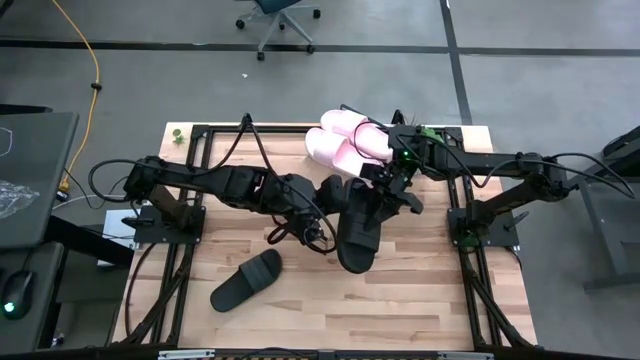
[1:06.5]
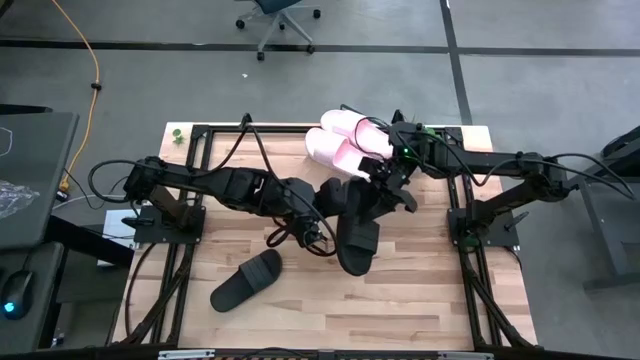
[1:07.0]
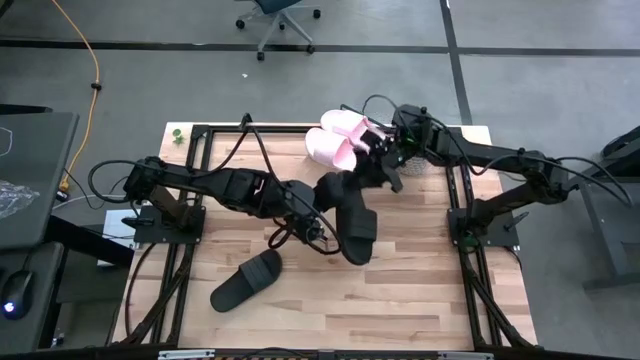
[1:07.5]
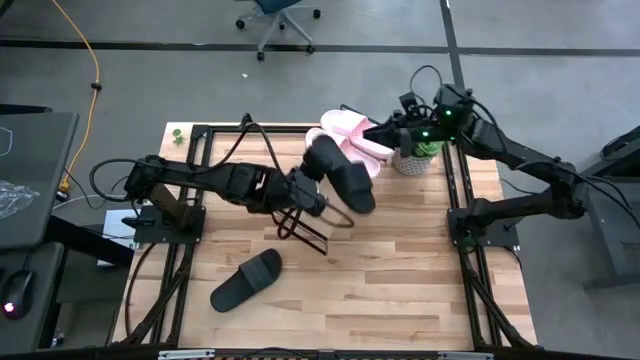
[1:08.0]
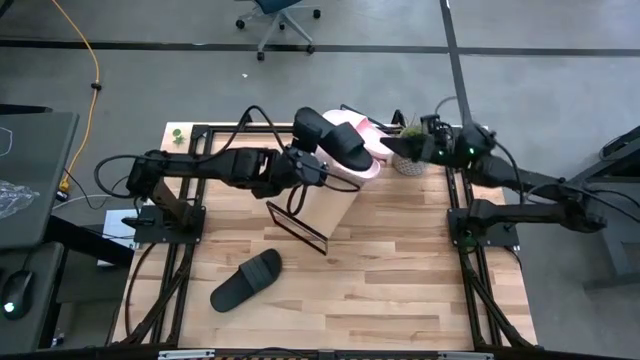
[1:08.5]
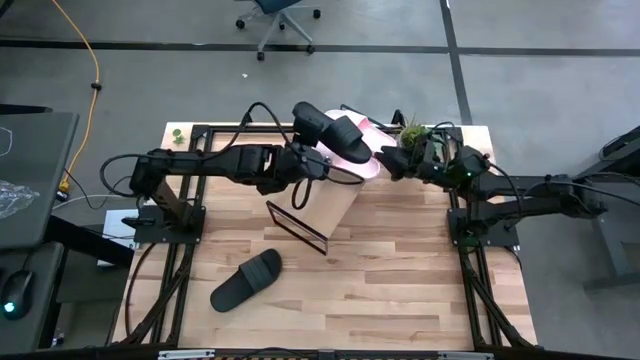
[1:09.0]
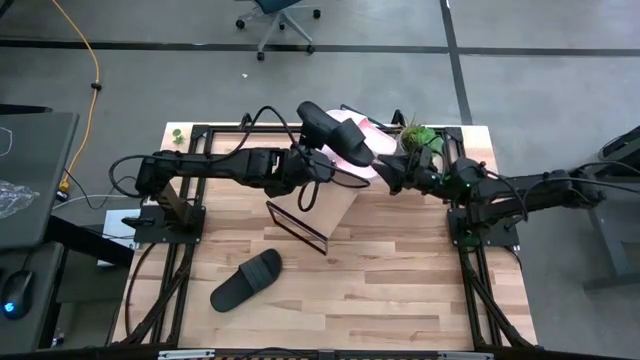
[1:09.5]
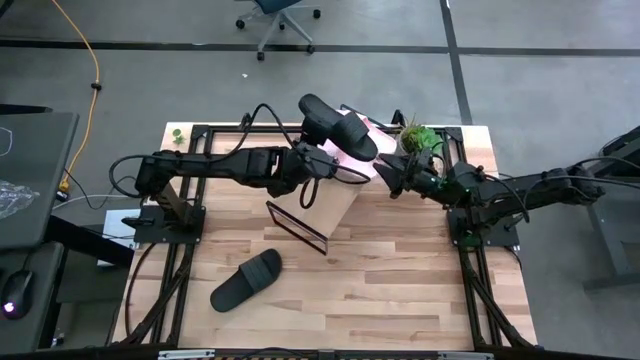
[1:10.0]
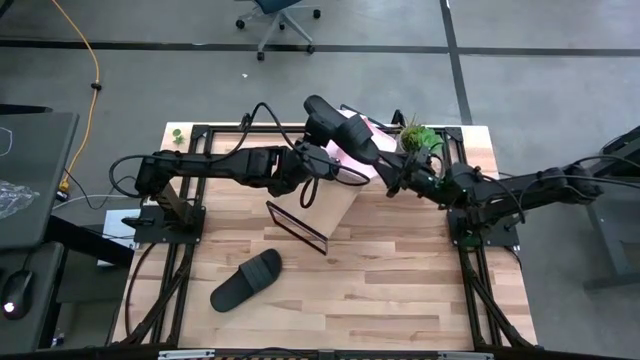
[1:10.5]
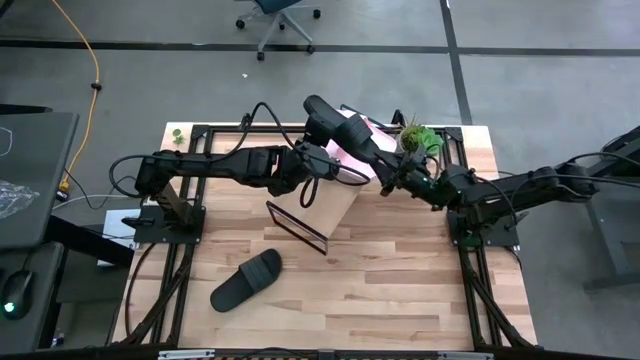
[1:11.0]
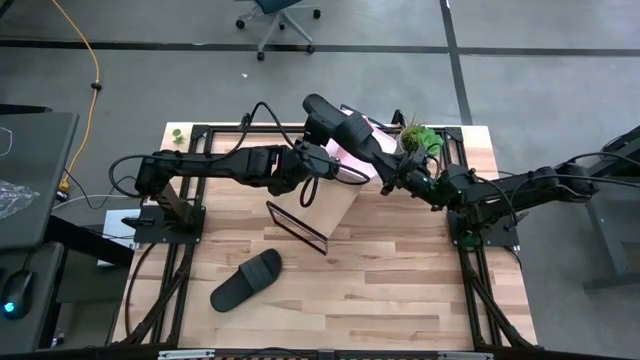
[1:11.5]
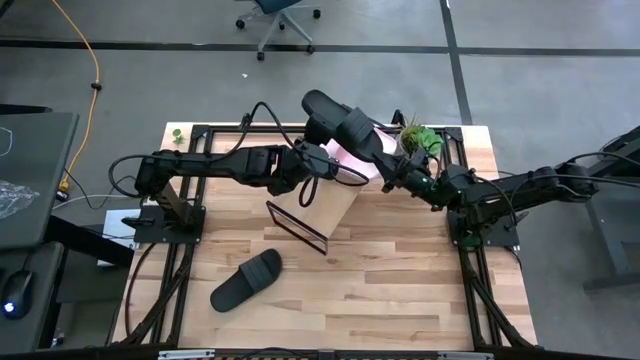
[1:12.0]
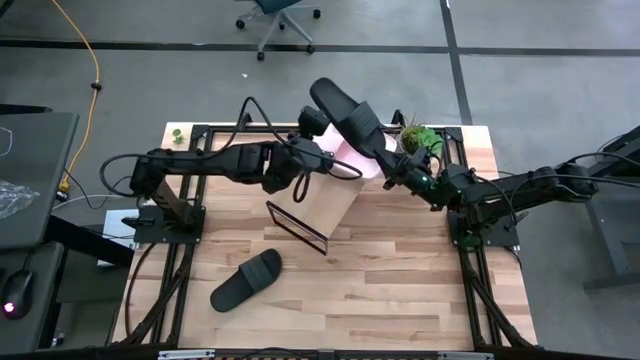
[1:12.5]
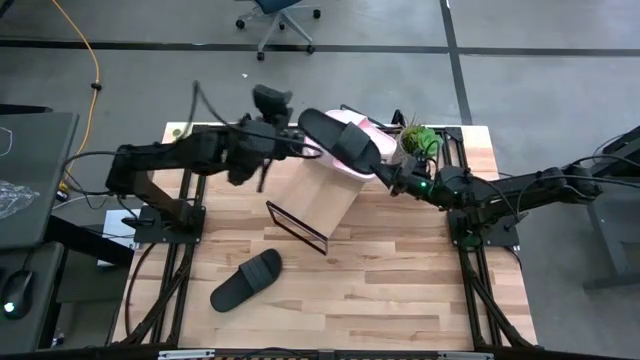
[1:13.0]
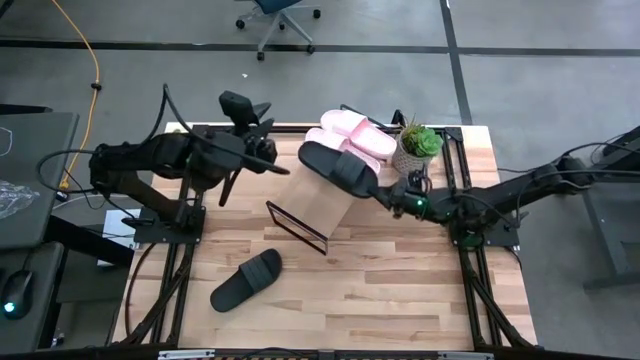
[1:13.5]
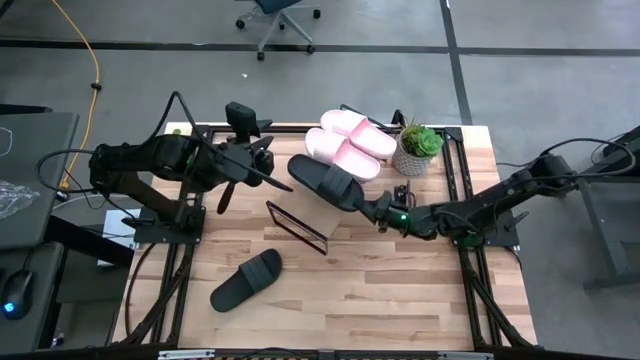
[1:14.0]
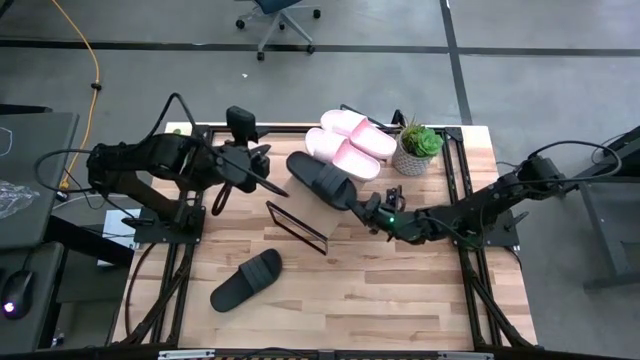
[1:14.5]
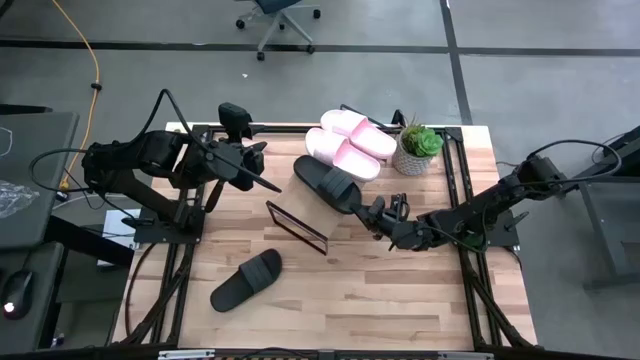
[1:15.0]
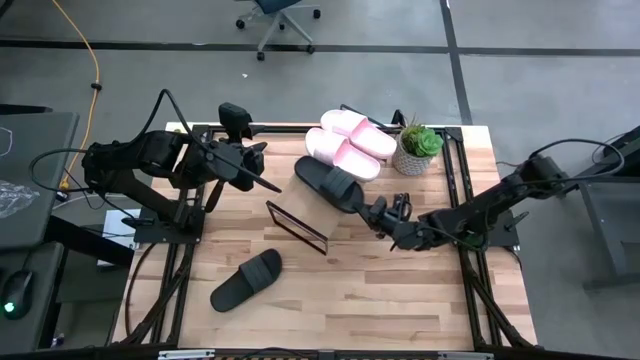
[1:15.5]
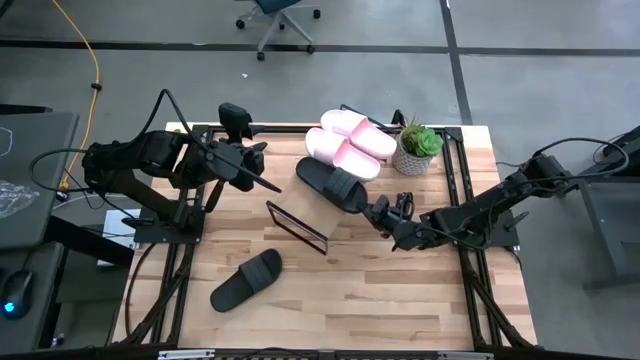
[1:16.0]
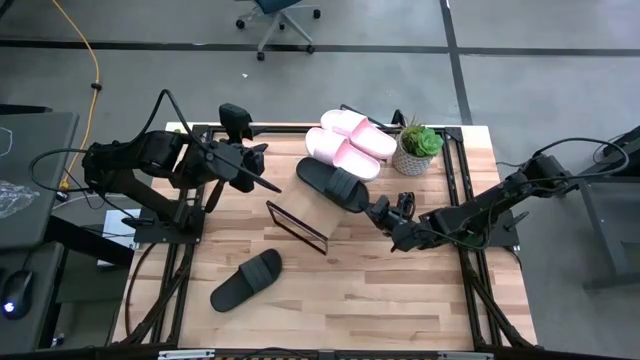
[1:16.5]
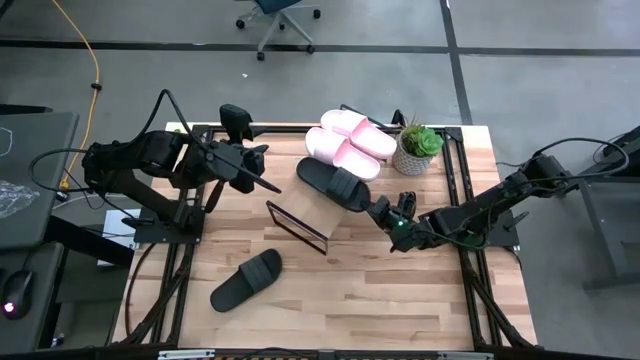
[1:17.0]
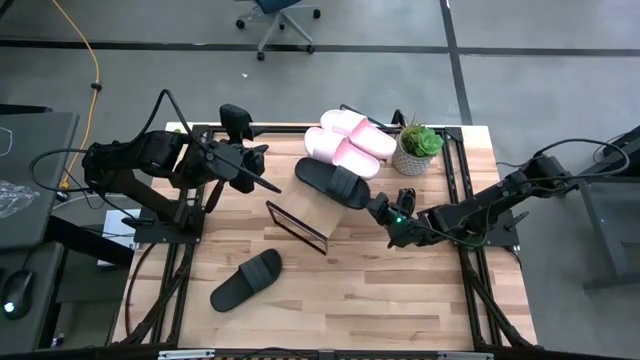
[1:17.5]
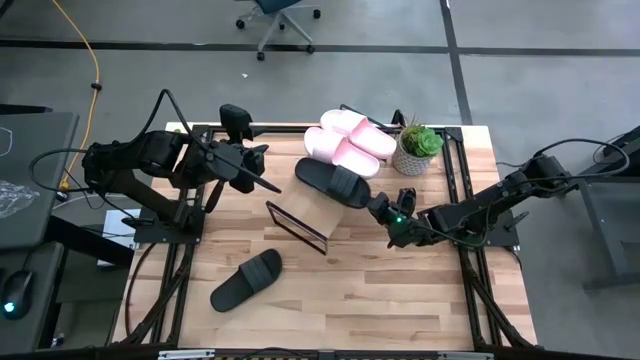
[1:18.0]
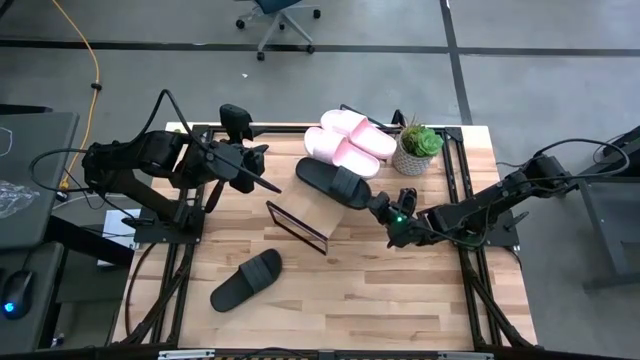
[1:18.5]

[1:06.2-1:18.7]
Task: Pick and place slides into the shelf
Put the right black slide on the shelf

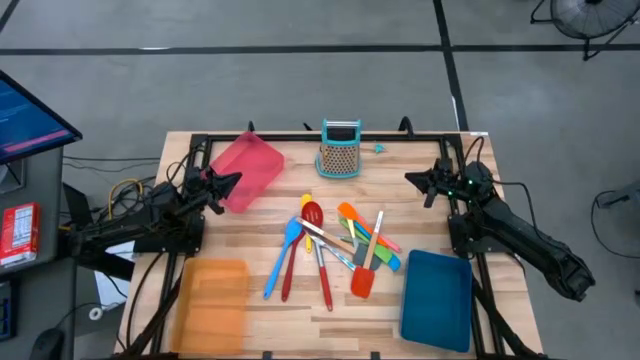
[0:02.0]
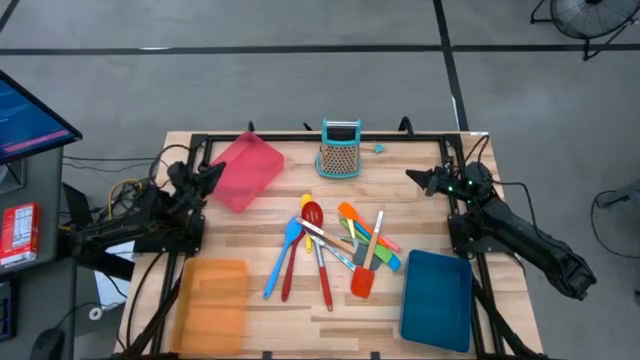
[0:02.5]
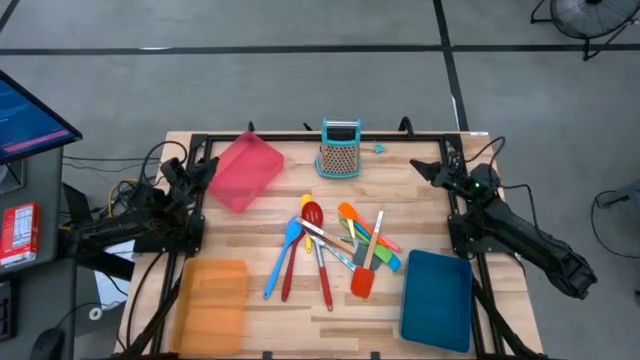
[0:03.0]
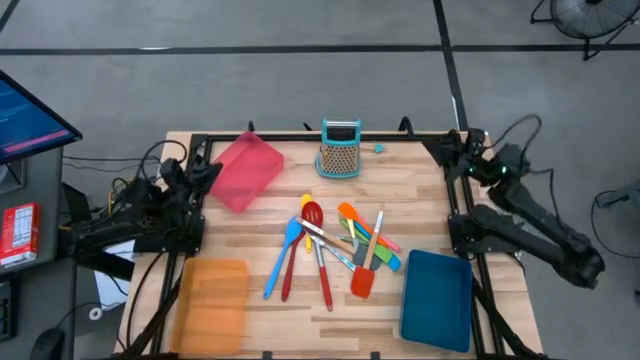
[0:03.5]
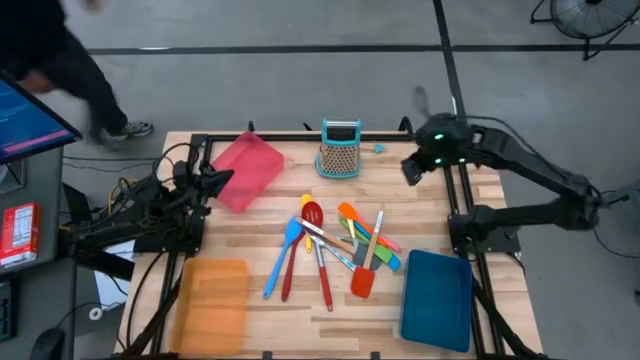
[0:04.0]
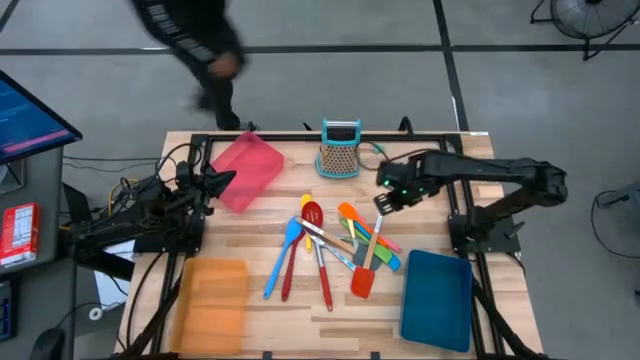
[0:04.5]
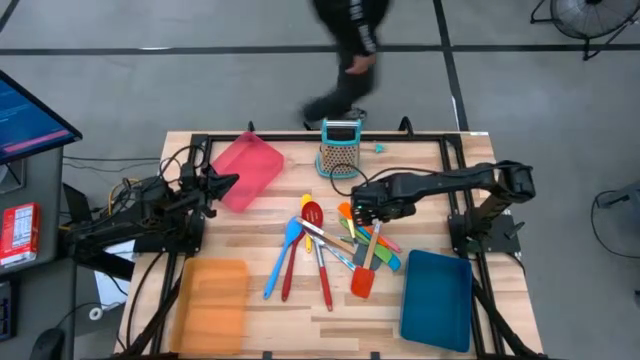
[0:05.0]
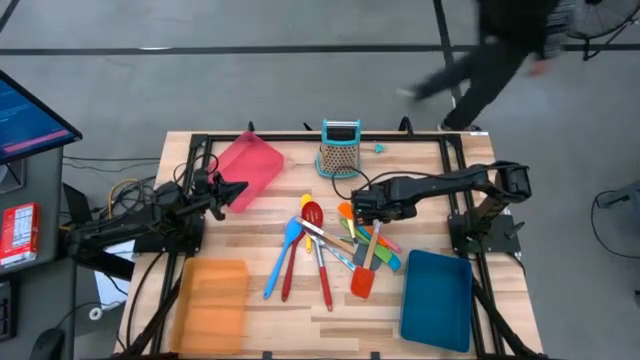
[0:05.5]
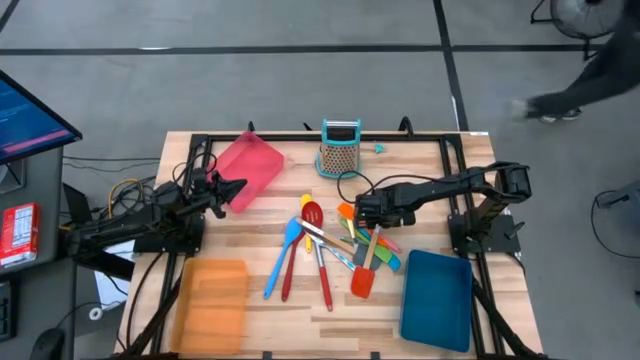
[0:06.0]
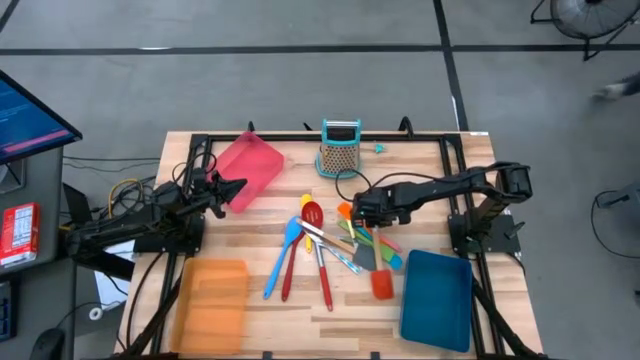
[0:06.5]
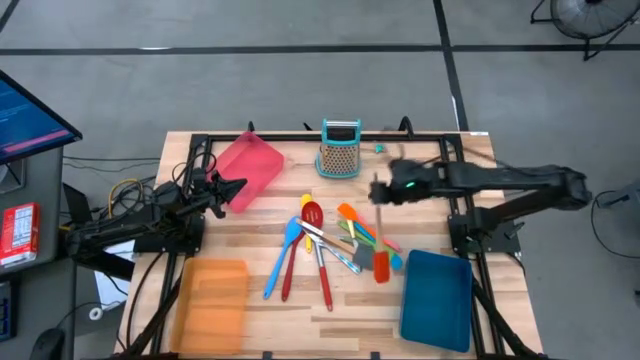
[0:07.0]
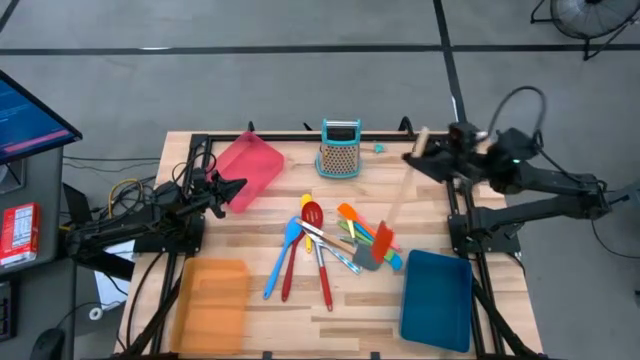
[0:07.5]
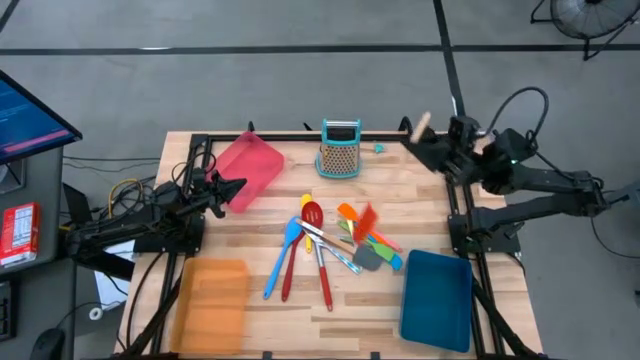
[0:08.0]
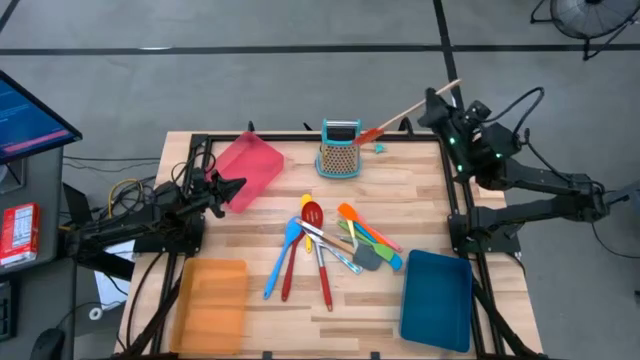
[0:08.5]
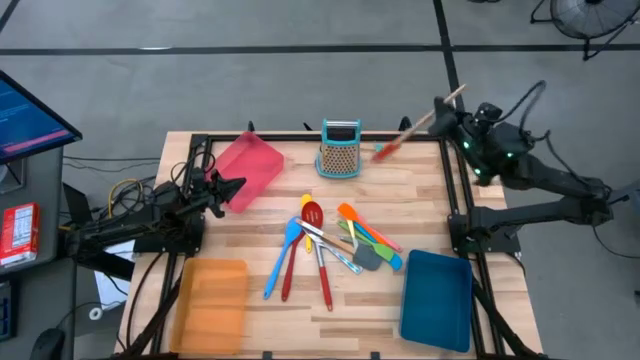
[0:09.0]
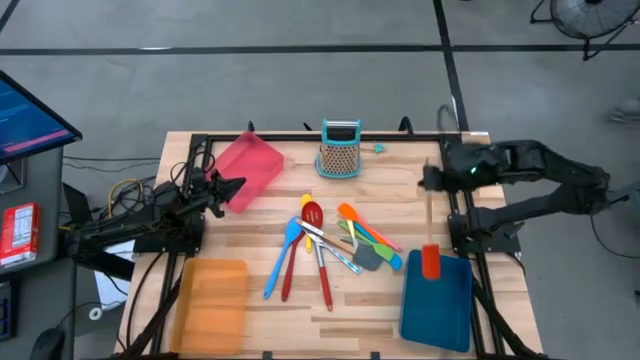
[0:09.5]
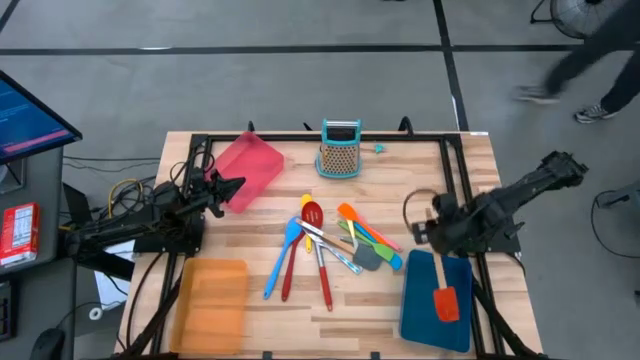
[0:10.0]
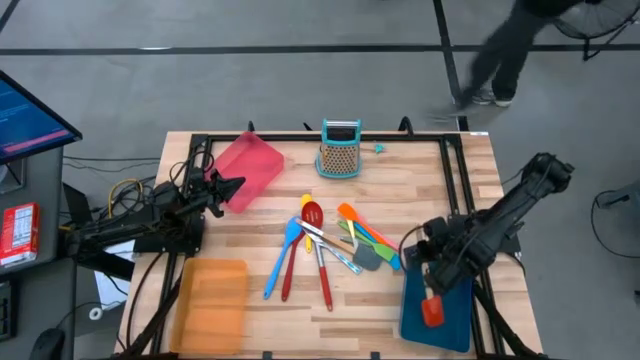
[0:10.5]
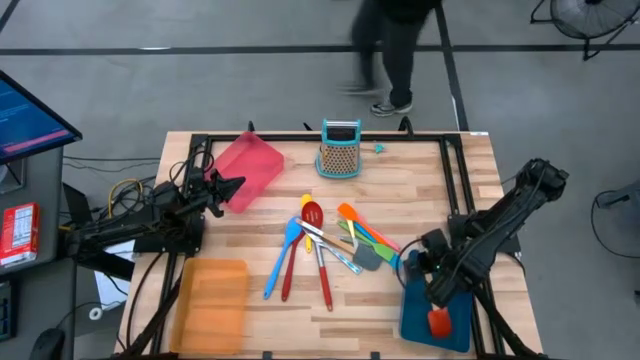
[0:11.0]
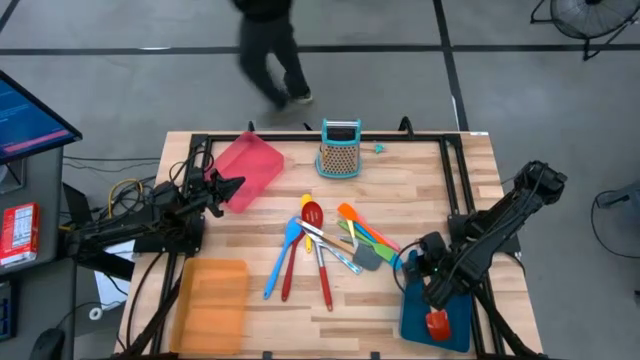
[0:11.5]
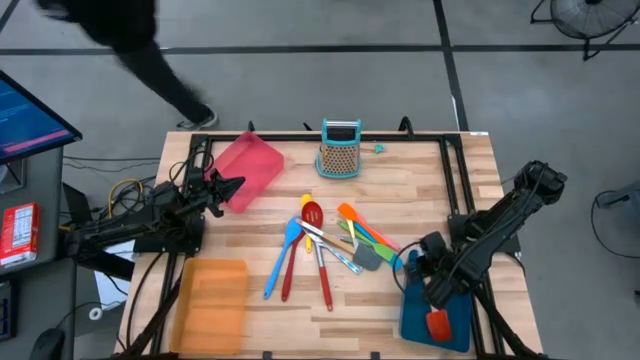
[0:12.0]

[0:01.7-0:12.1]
Task: Pick & Place Kitchen Items
Put the orange brown spatula into the blue bin
